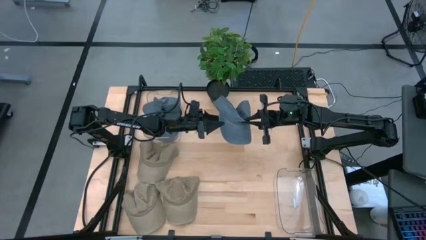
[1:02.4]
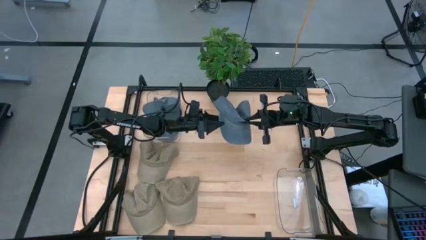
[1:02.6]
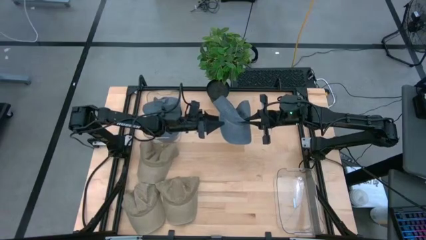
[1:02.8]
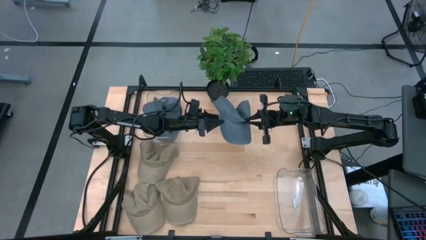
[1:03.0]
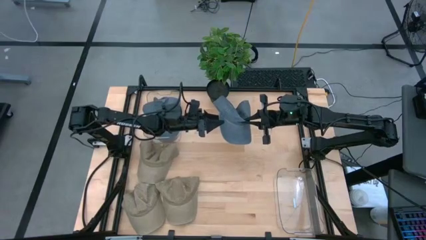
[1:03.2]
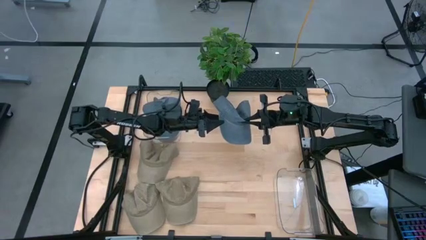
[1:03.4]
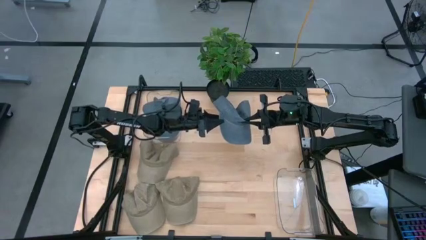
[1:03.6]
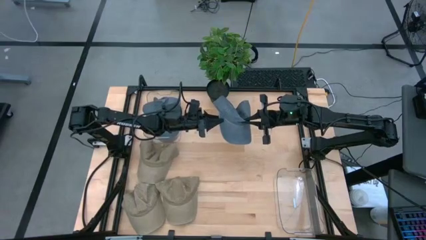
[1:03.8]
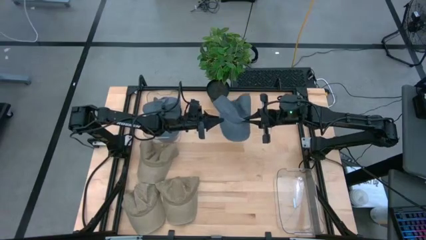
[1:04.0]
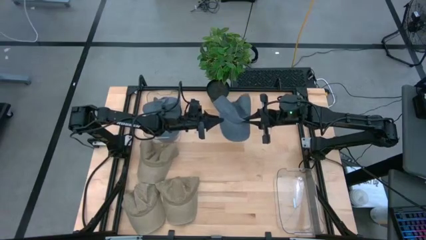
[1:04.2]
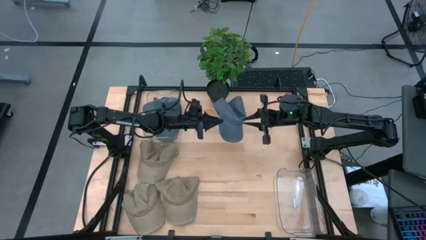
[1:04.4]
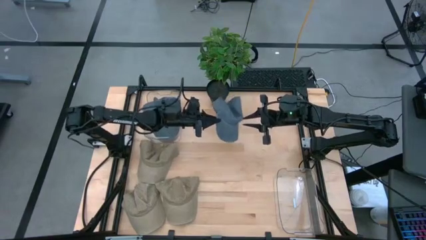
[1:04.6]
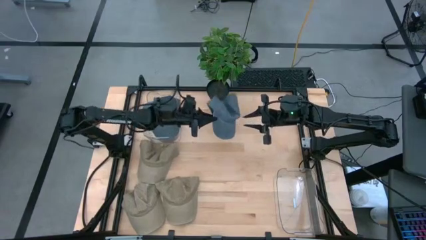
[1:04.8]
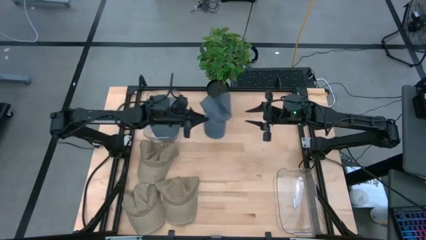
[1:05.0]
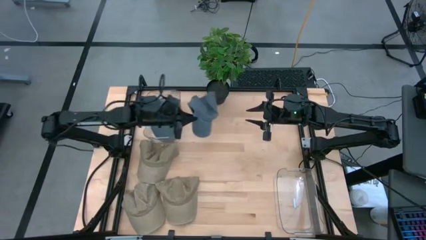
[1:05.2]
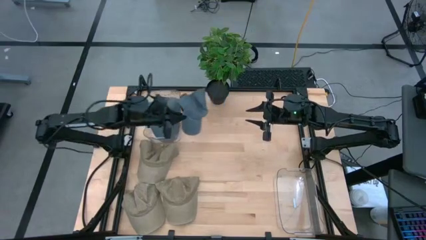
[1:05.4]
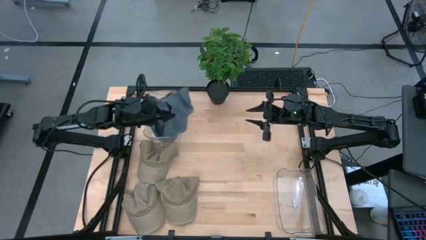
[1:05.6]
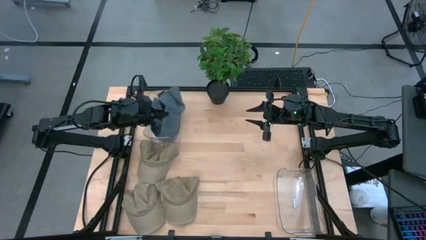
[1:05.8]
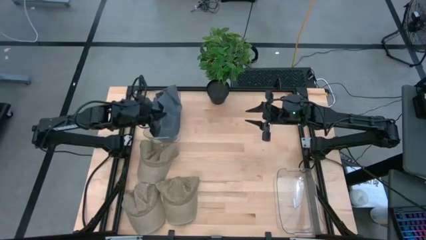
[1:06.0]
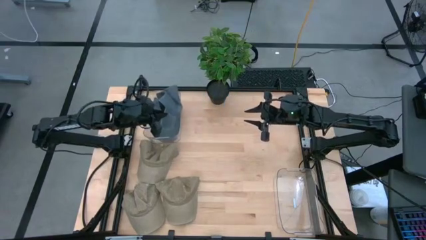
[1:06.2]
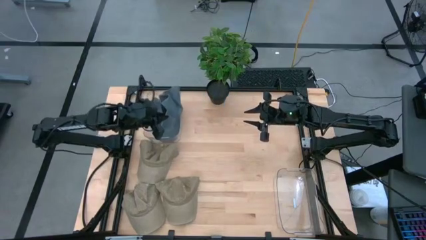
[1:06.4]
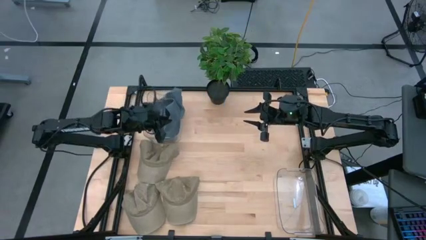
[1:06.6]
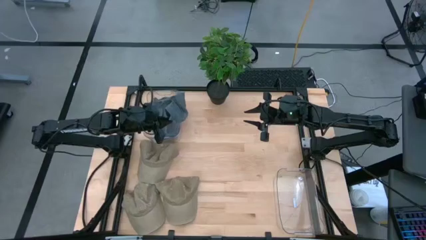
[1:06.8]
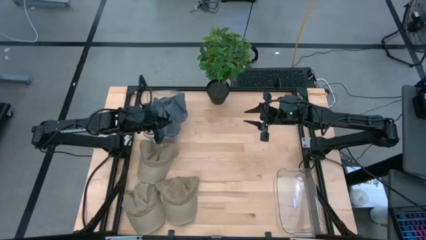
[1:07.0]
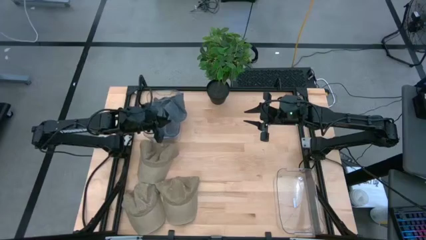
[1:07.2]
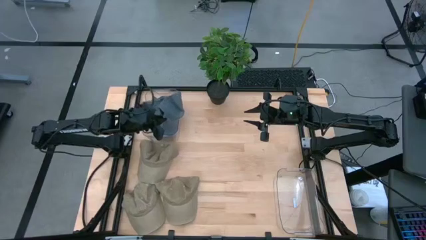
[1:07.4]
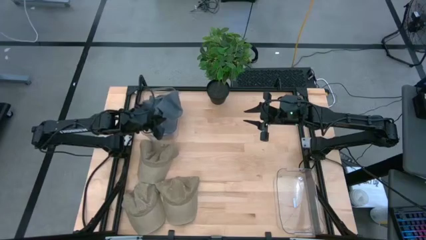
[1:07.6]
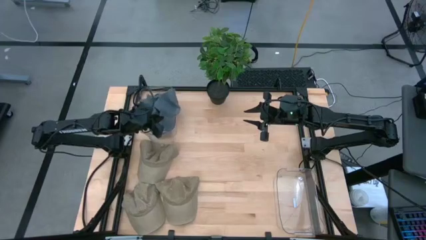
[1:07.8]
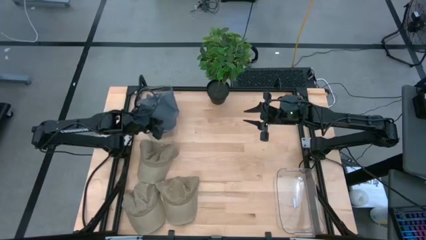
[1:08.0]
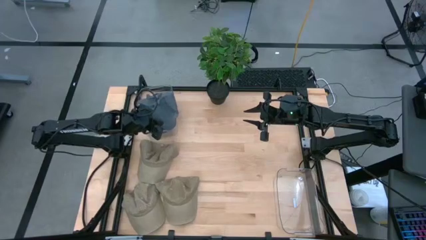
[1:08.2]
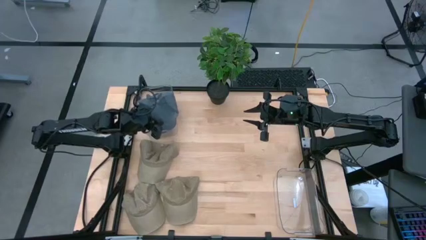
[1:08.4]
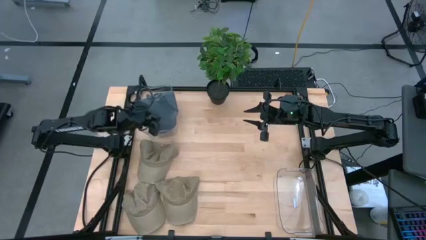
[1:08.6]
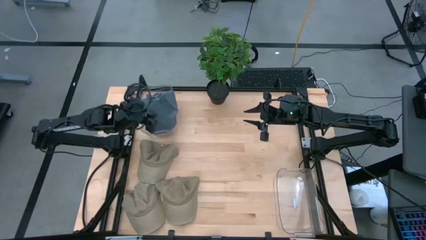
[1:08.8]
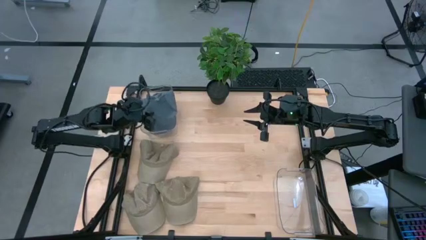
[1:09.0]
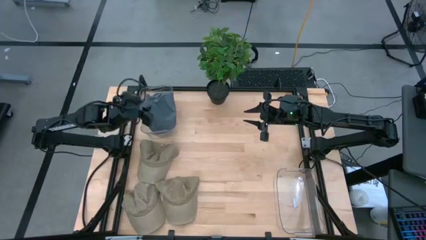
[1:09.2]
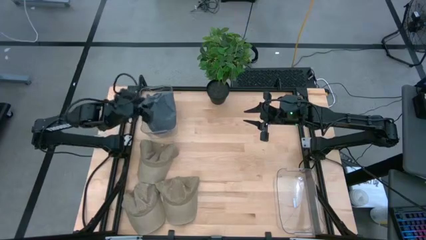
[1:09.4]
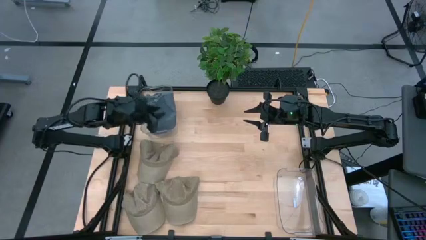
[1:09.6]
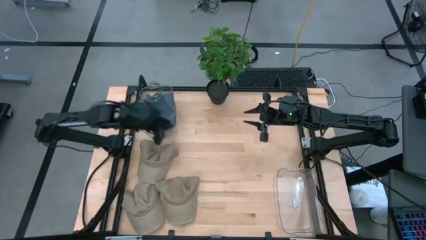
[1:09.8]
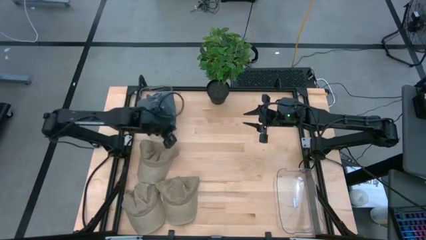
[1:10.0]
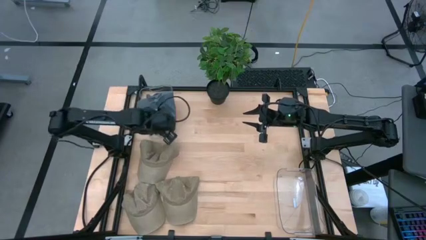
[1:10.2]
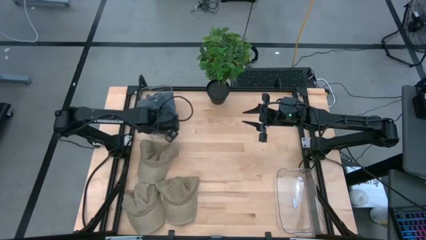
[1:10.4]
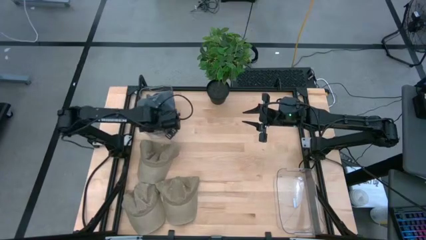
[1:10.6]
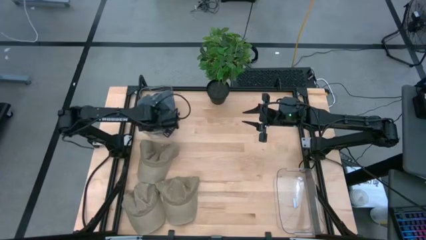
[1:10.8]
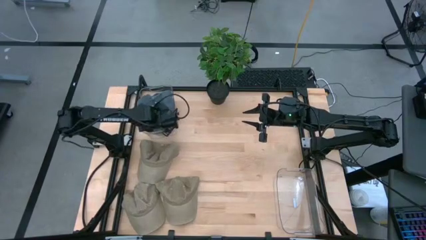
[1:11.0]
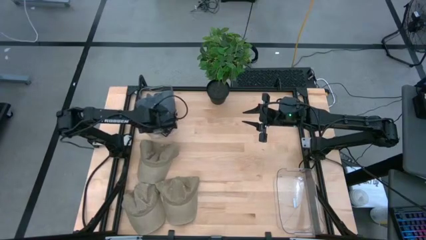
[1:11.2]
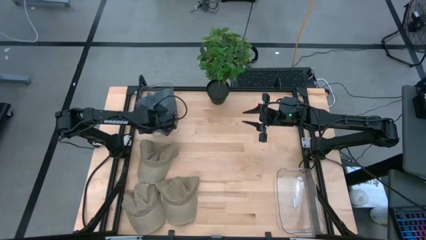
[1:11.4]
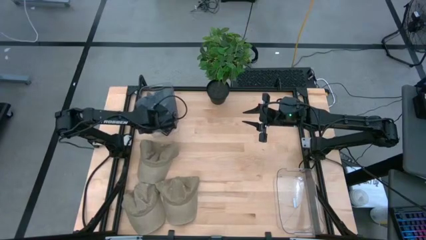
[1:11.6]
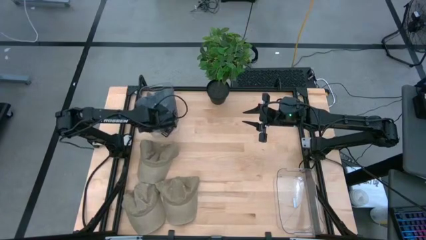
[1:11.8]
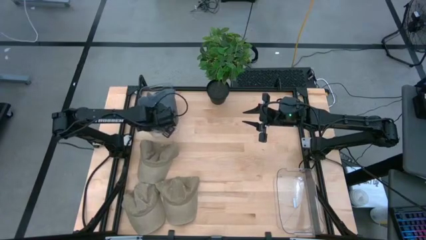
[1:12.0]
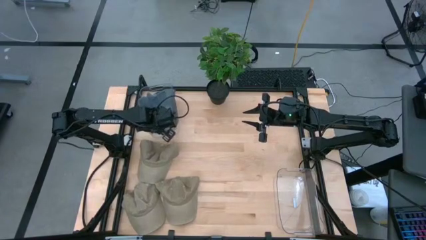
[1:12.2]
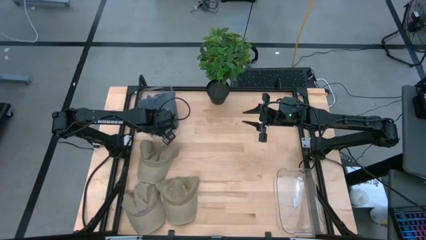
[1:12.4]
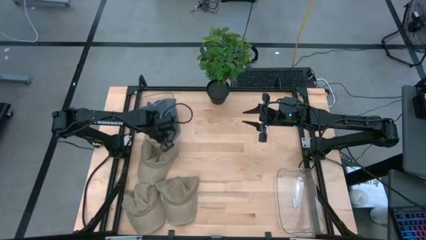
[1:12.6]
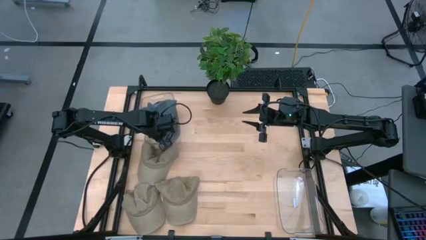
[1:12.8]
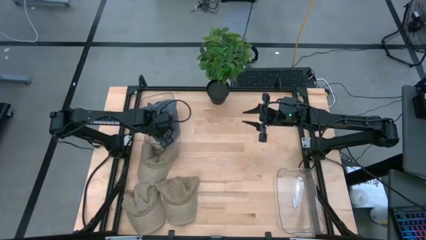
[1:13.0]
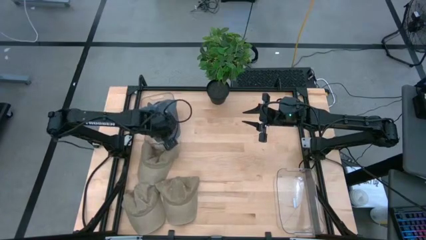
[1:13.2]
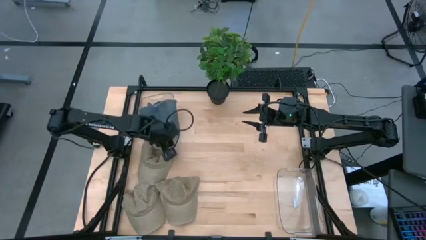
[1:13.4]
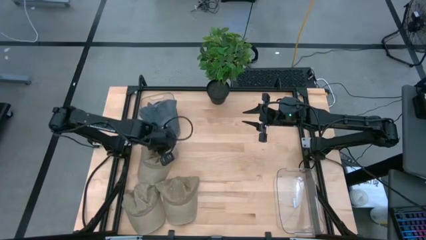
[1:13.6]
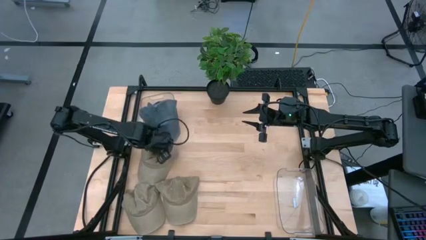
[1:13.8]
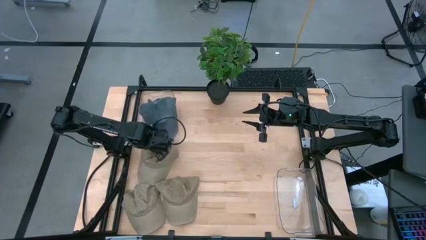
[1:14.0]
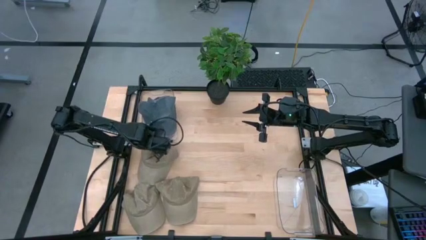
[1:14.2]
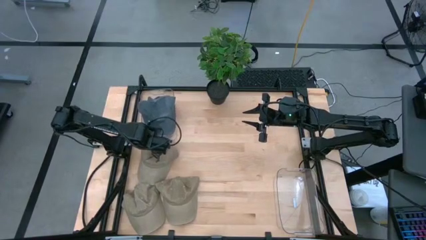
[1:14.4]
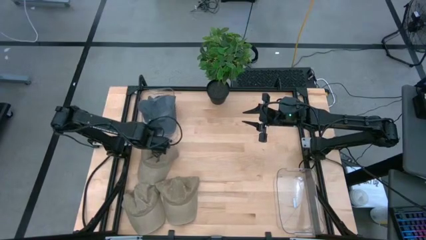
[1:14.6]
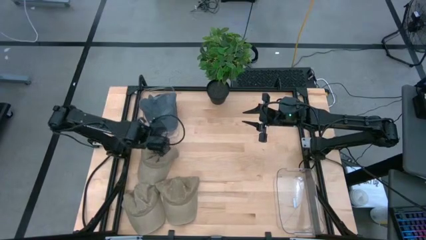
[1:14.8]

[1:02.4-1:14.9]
Task: Pick & Place hat
Put the blue cap into the left transparent bin

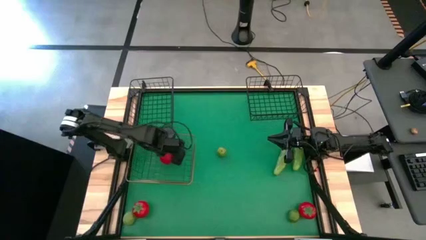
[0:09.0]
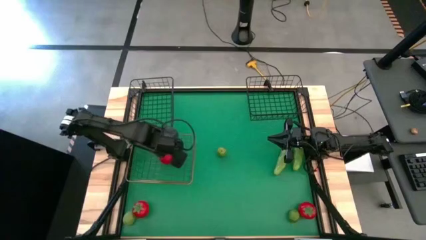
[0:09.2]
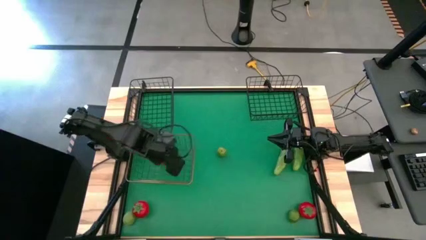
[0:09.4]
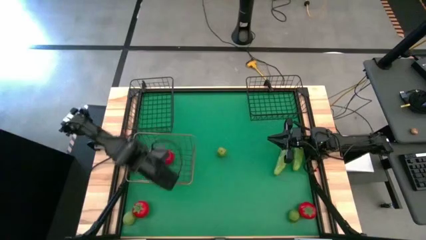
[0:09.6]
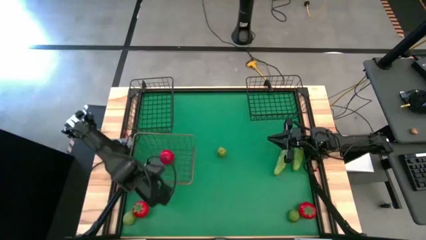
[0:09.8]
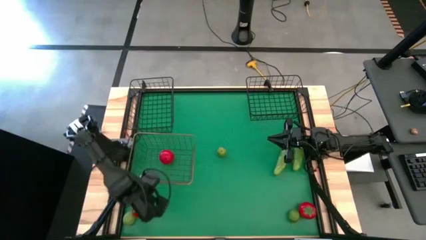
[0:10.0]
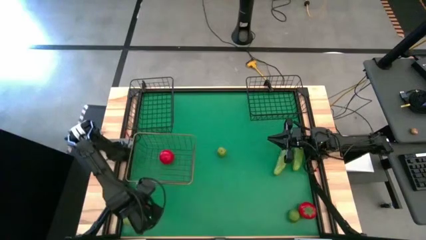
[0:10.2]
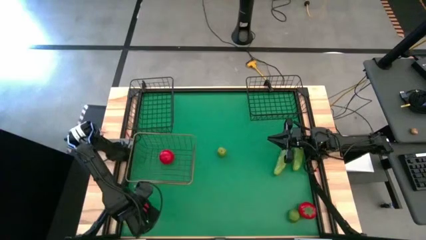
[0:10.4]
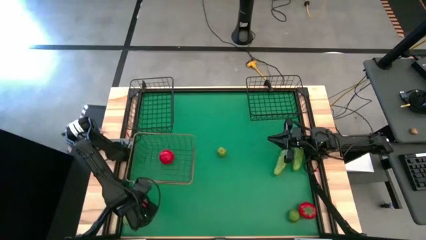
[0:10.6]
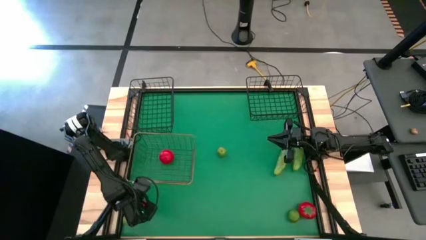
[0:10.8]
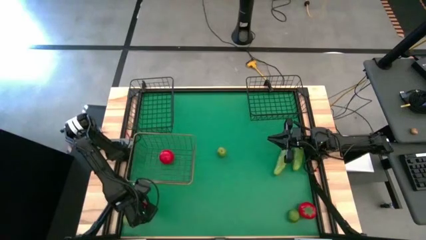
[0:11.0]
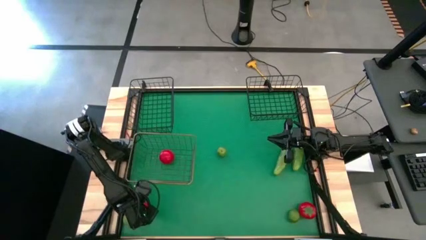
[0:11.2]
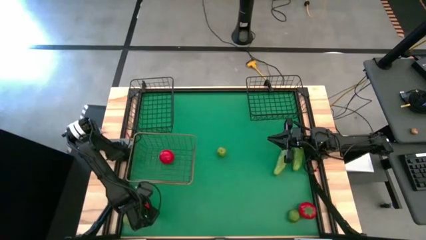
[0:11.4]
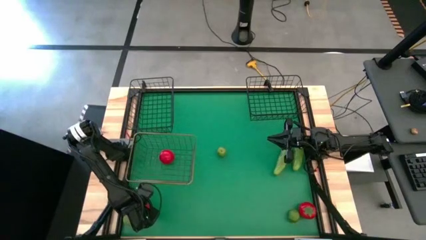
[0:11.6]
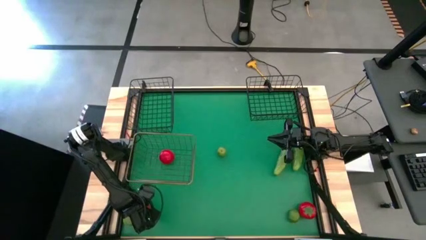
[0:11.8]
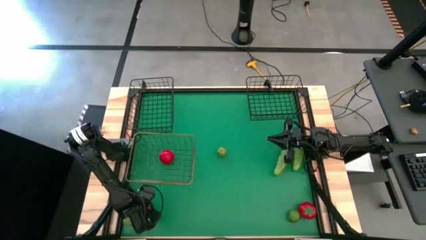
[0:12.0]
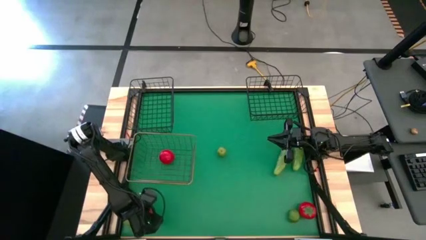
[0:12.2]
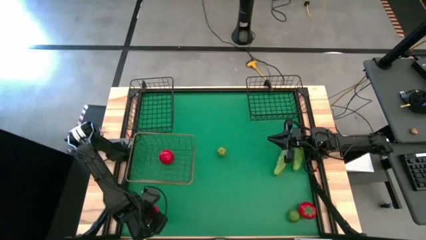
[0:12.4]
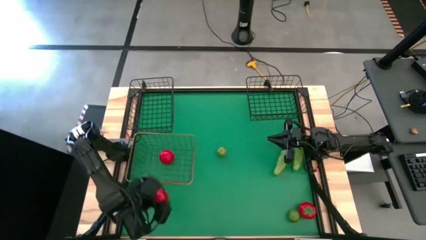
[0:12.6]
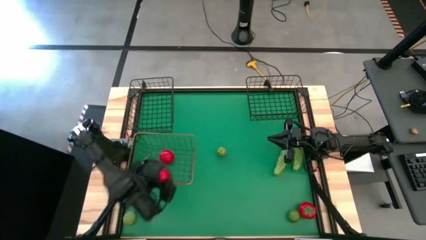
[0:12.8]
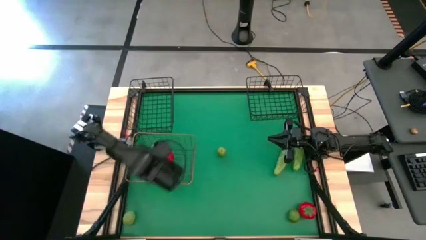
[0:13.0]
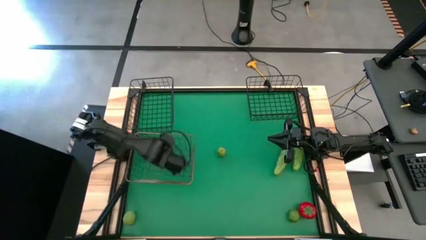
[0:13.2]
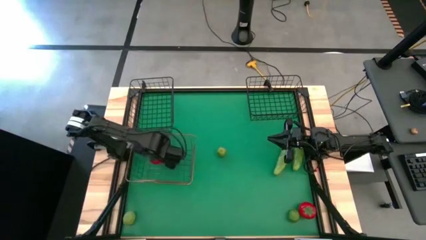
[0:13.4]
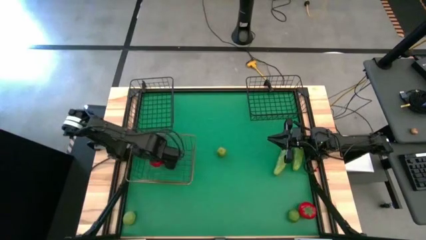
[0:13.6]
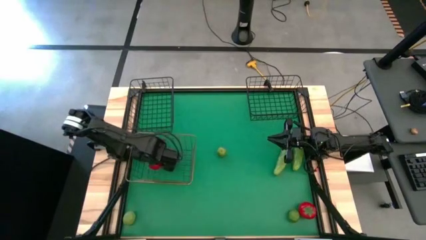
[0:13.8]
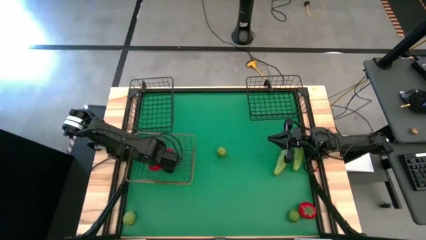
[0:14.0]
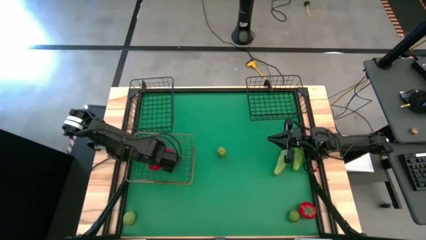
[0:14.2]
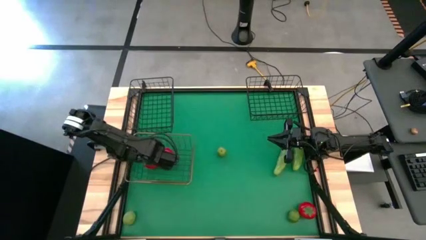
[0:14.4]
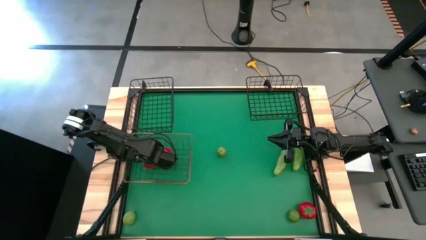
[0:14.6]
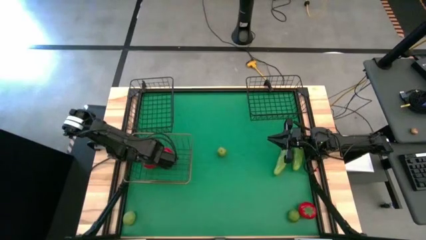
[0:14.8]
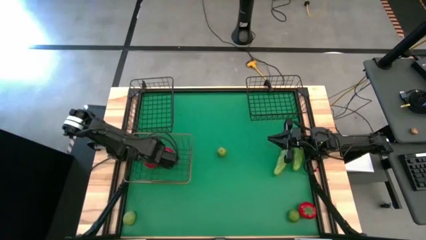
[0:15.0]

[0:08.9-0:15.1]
Task: Sort produce into baskets
Put the left tomato into the golden wire basket
